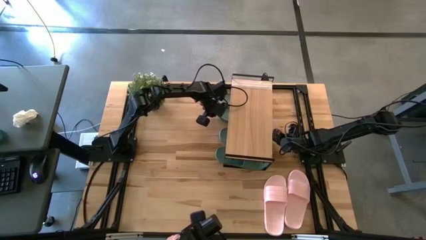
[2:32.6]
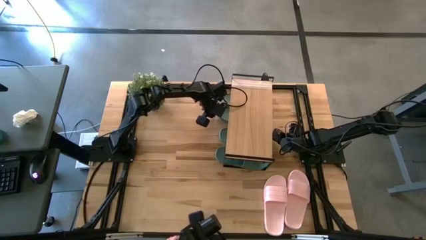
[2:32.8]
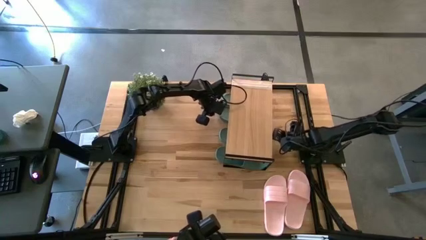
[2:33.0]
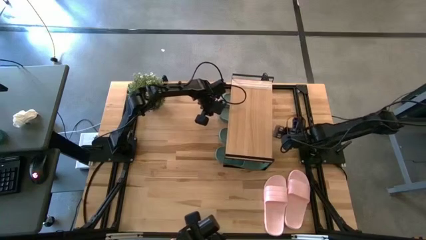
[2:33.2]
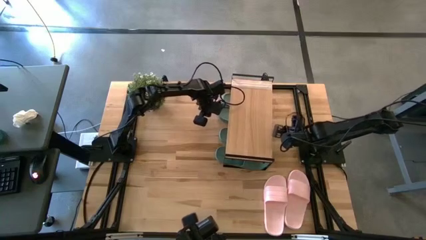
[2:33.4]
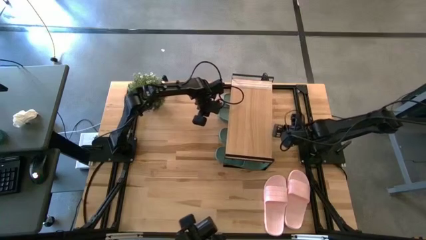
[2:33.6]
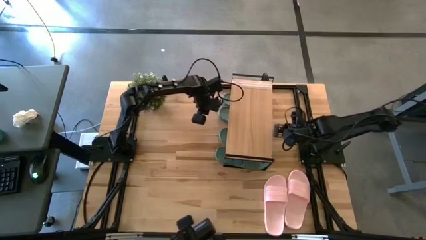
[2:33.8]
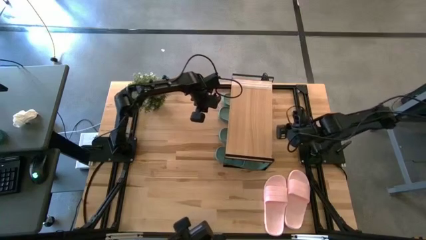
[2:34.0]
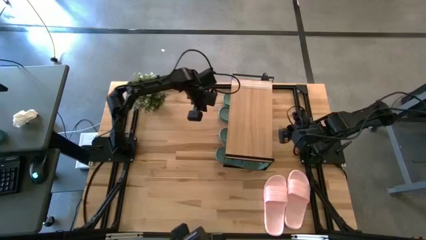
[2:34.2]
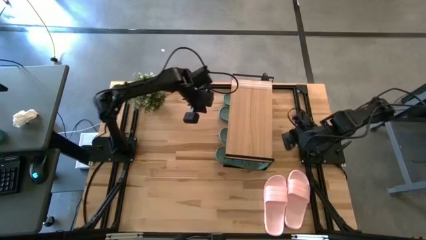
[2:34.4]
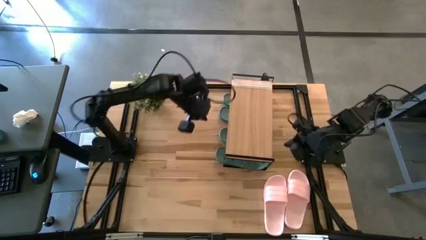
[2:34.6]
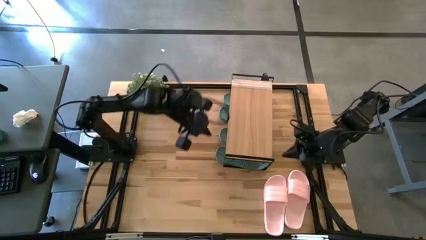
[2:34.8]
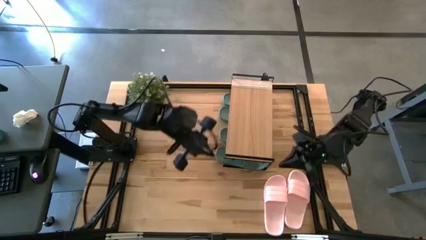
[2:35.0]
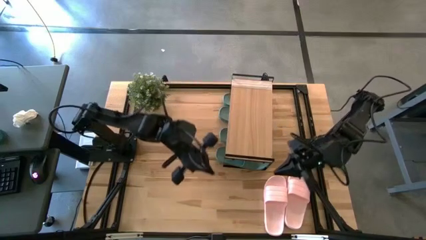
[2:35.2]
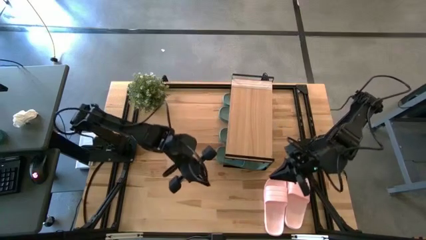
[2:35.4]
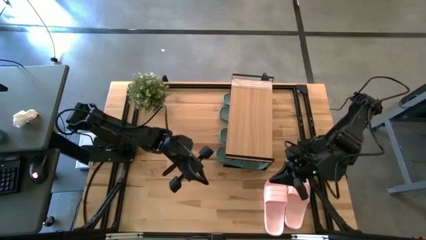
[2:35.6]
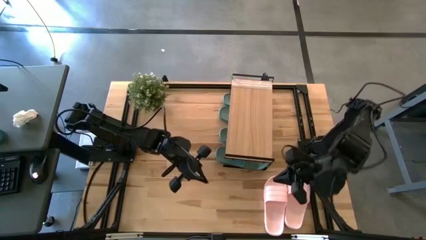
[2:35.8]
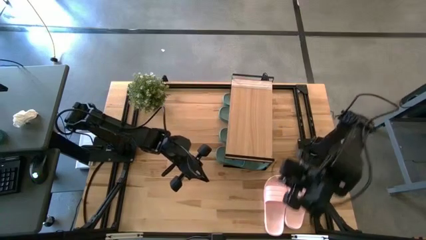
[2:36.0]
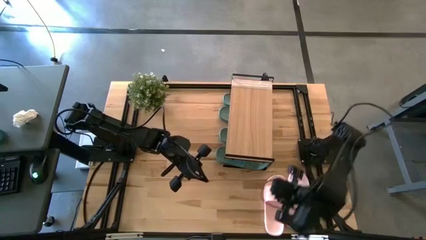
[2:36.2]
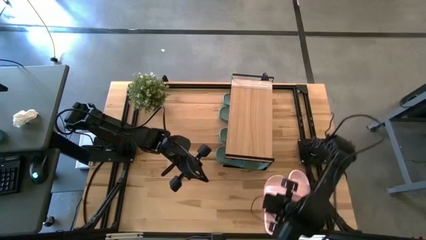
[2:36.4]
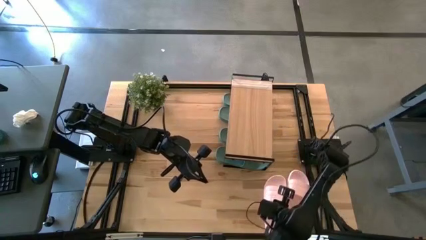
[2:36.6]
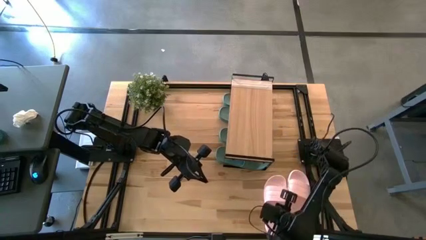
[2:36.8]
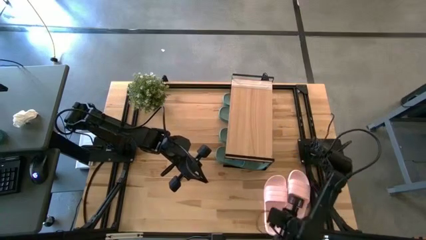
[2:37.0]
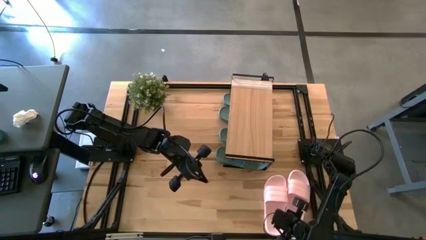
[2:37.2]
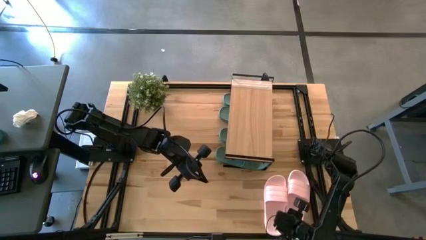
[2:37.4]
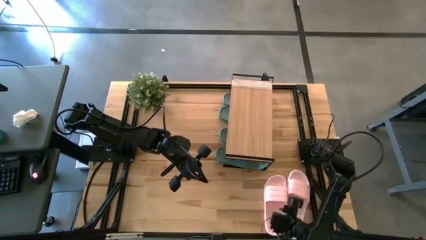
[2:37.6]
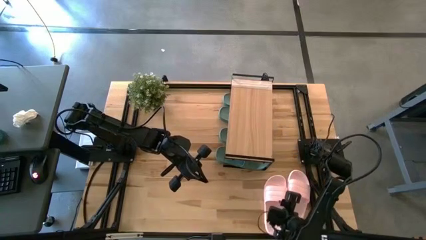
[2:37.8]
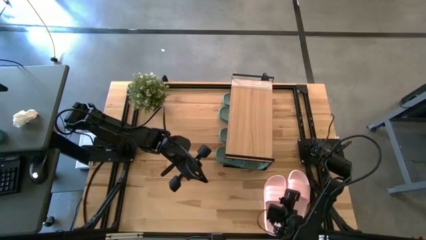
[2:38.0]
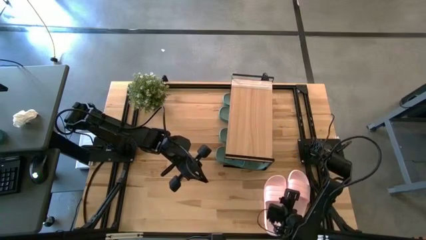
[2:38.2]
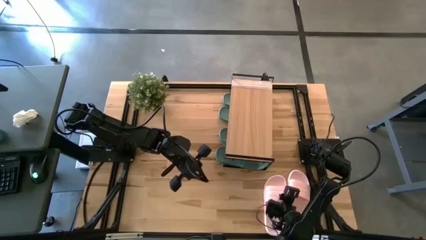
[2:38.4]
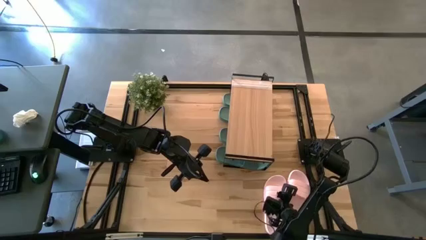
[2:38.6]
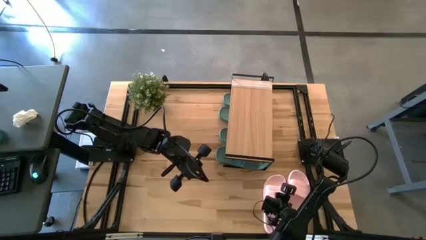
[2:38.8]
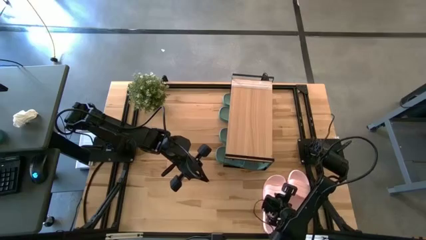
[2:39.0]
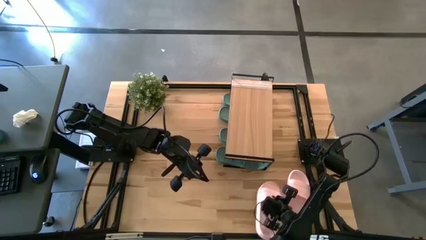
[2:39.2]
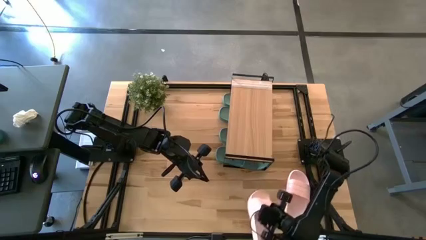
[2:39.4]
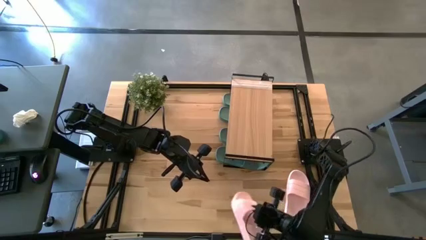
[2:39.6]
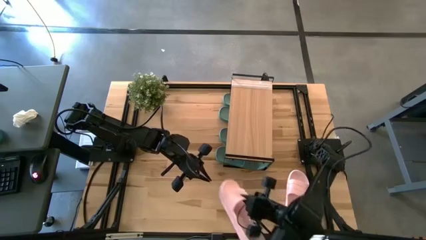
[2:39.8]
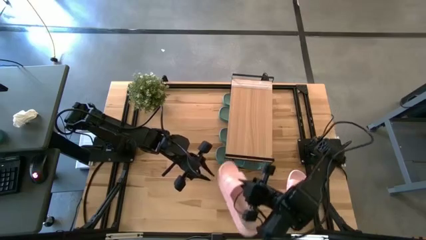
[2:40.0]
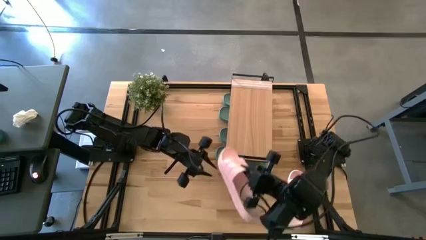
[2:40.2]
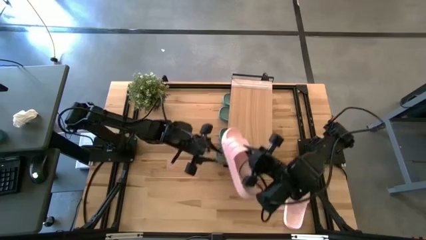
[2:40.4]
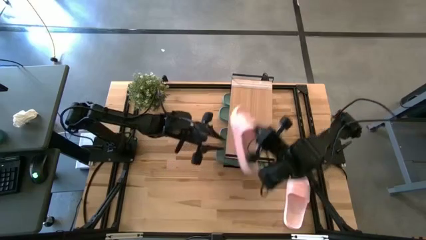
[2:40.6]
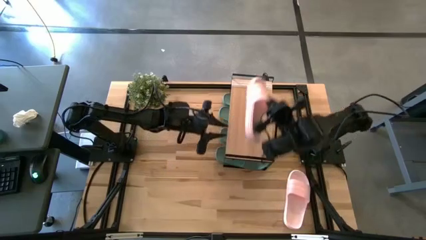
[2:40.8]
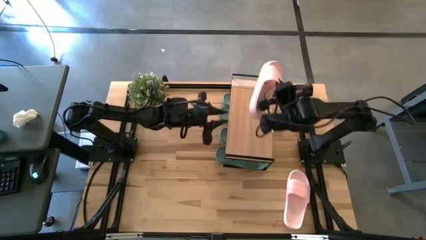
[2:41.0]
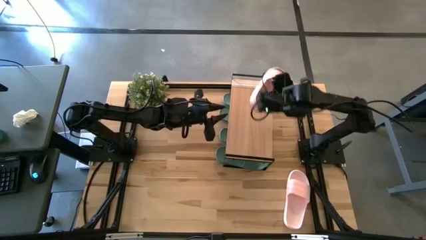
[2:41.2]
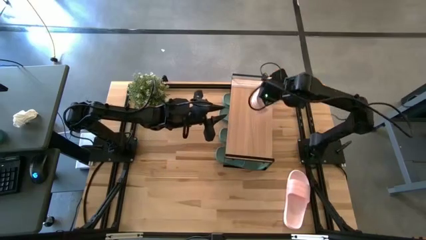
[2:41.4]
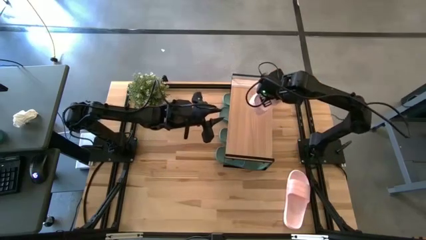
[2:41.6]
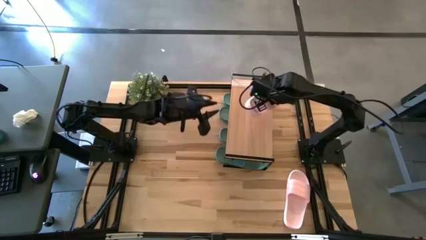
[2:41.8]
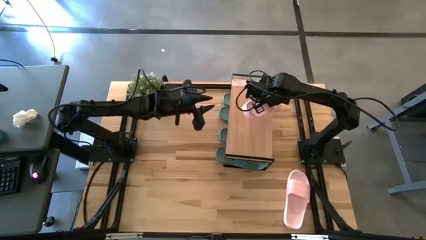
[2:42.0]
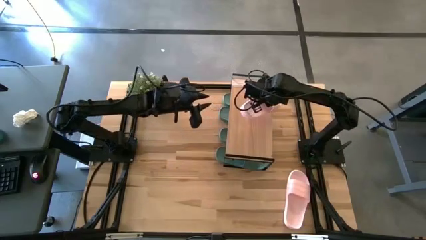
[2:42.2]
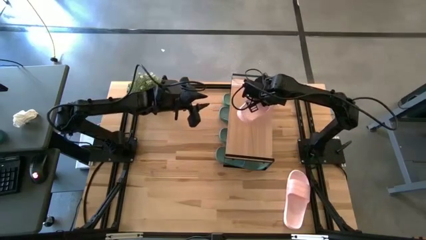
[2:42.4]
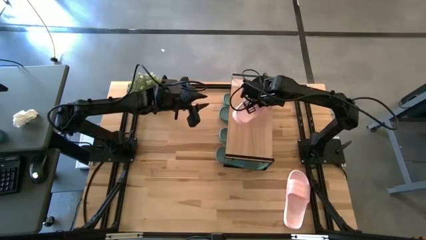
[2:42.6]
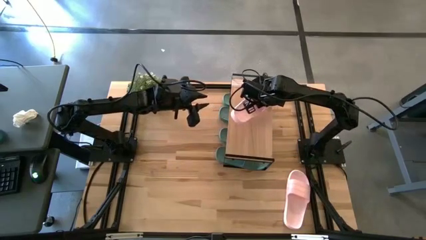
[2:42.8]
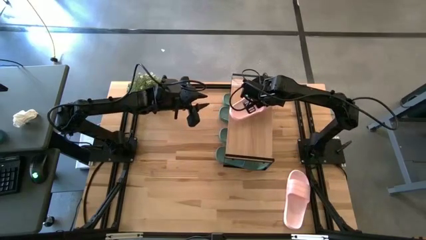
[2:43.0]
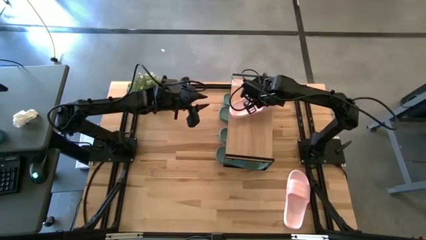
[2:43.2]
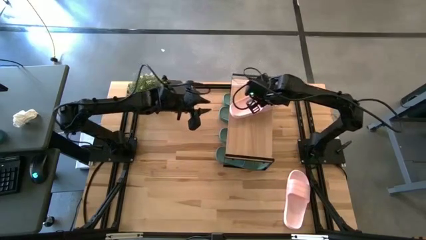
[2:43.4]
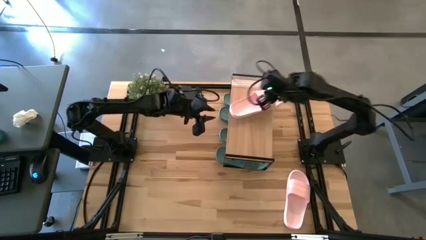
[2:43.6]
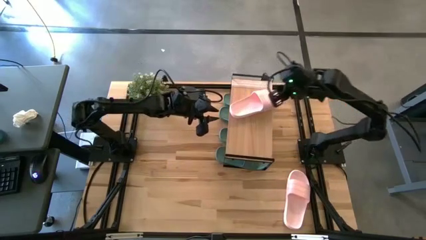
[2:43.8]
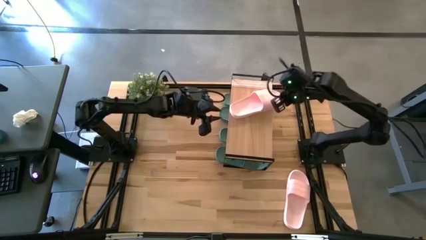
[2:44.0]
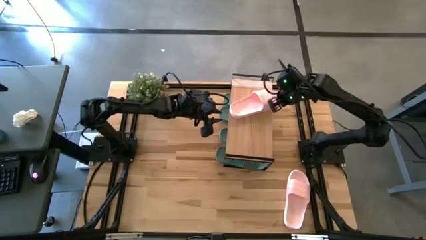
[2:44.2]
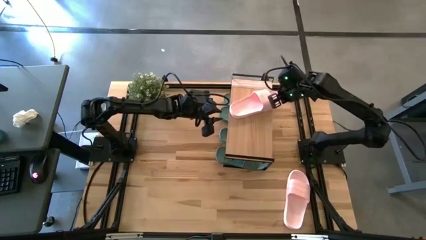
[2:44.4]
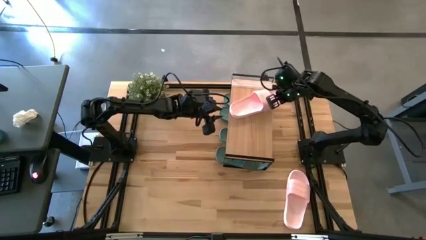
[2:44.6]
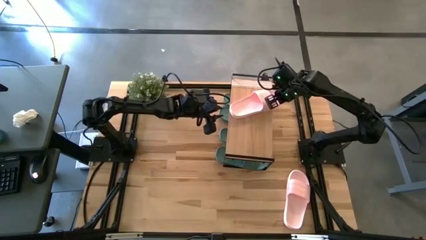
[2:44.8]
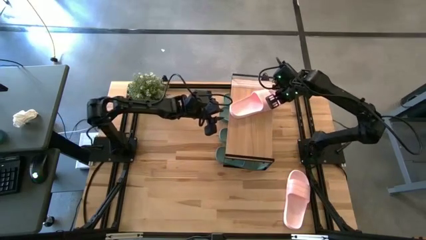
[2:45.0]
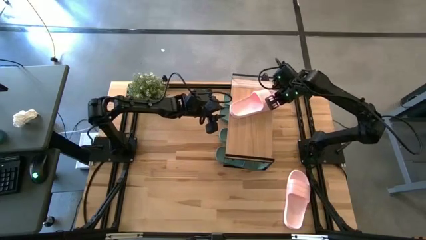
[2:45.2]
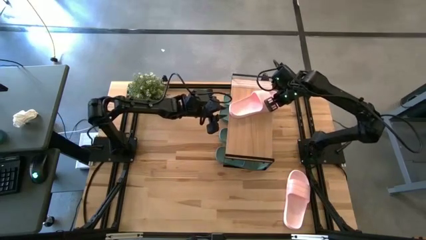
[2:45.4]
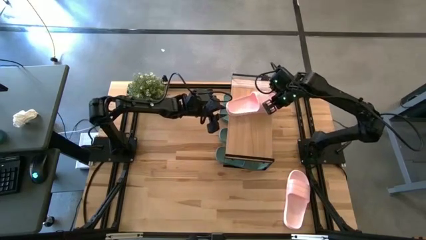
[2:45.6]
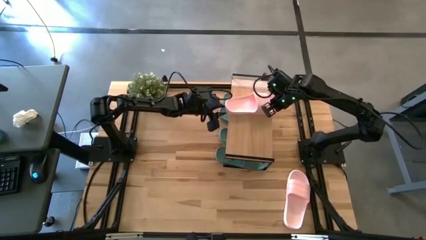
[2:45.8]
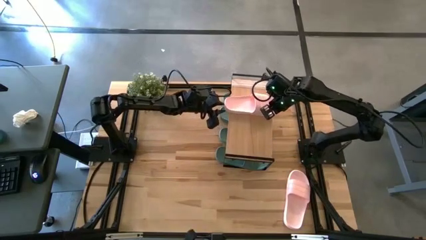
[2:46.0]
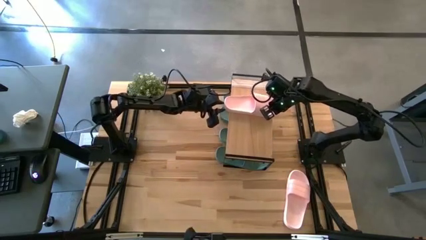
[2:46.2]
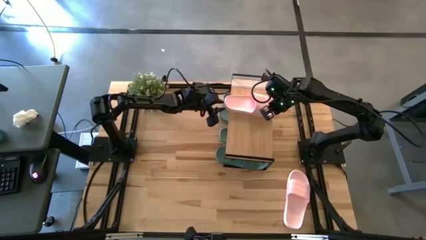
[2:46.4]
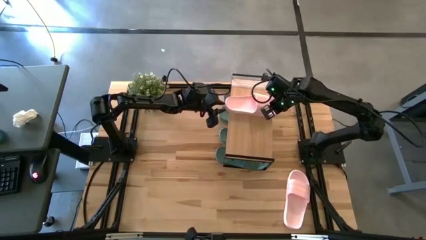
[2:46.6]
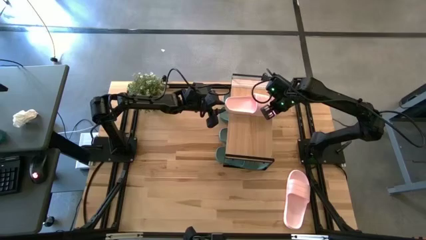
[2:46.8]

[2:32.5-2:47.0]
Task: Pick and place slides into the shelf
Put the pink slide on the shelf

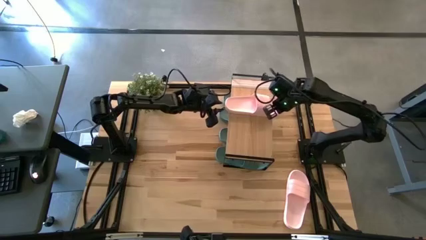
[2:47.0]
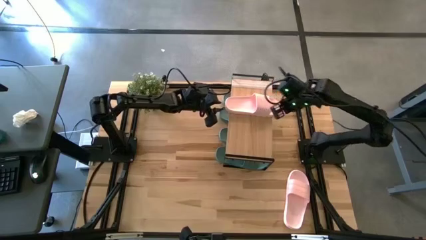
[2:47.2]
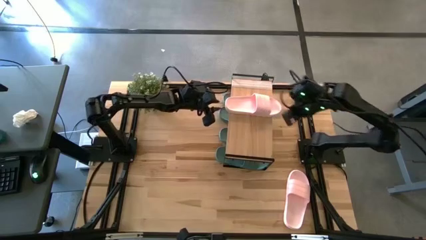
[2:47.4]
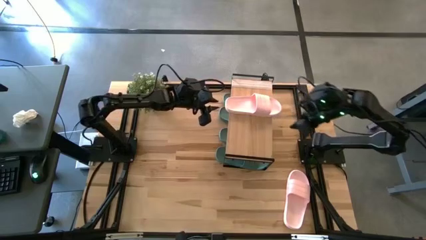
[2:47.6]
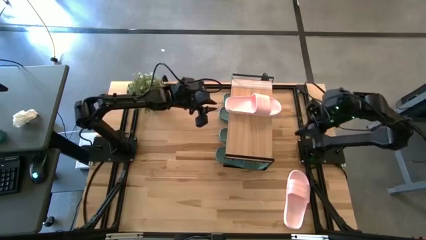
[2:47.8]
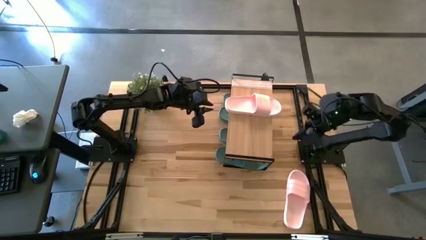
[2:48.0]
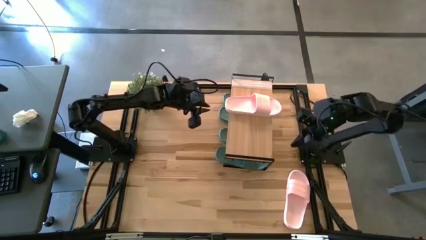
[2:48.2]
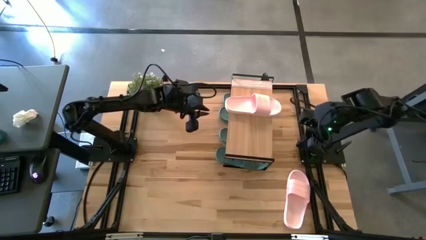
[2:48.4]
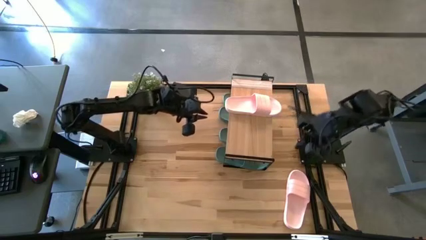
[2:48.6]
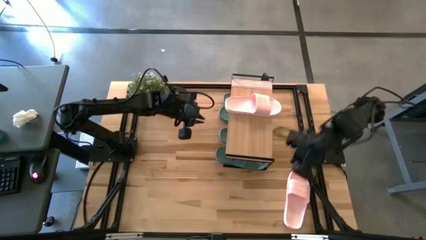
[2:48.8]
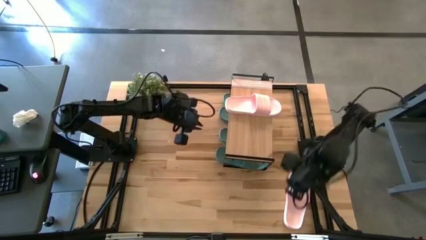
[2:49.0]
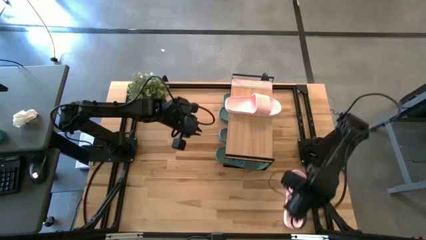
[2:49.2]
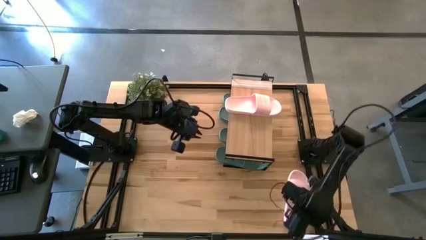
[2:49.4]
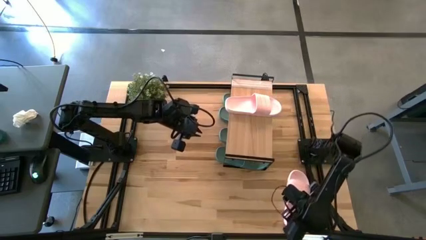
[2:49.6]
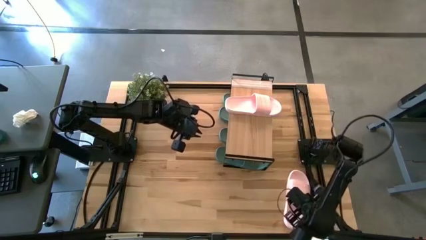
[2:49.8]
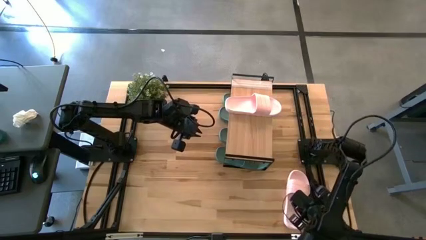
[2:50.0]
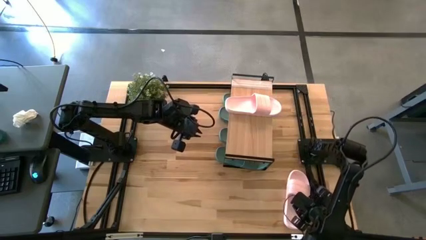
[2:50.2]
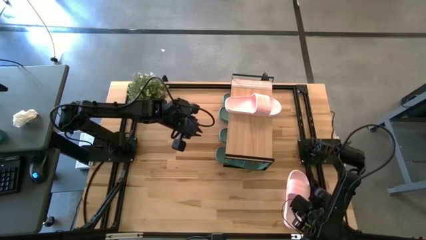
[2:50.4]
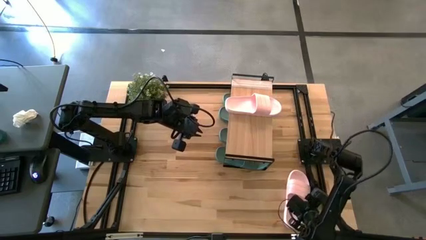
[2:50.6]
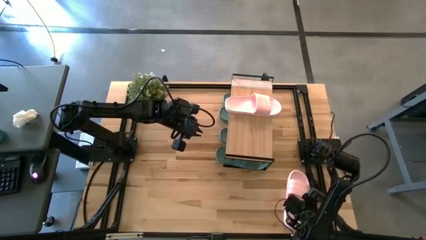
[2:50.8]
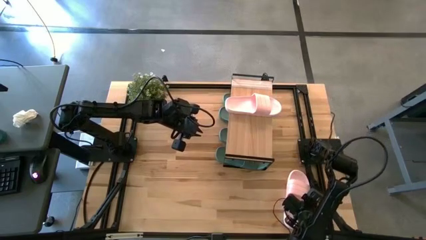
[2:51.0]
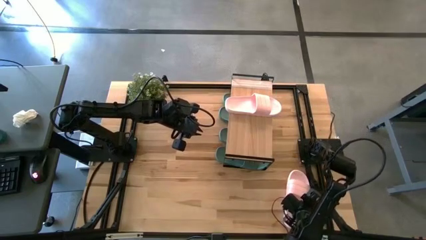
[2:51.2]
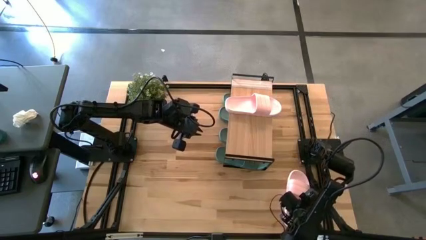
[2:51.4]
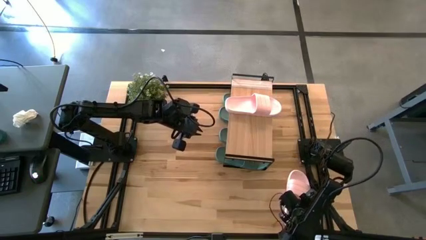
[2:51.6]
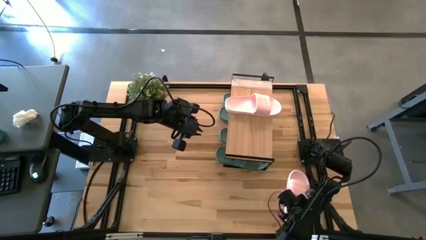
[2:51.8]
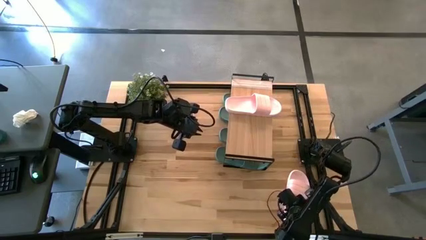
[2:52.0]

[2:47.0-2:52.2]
Put the pink slide on the shelf
